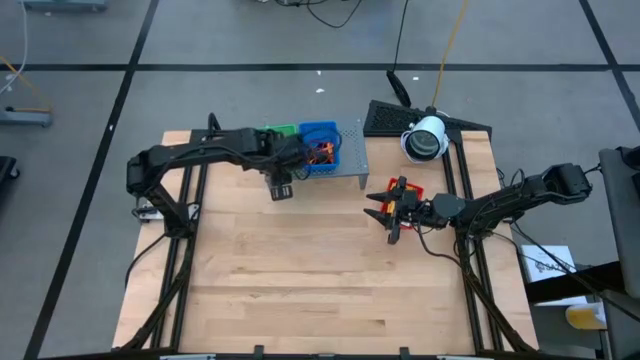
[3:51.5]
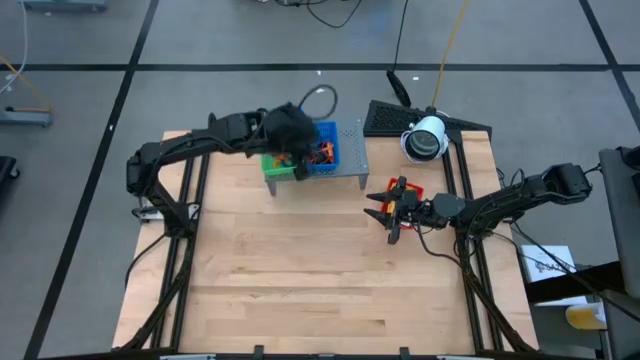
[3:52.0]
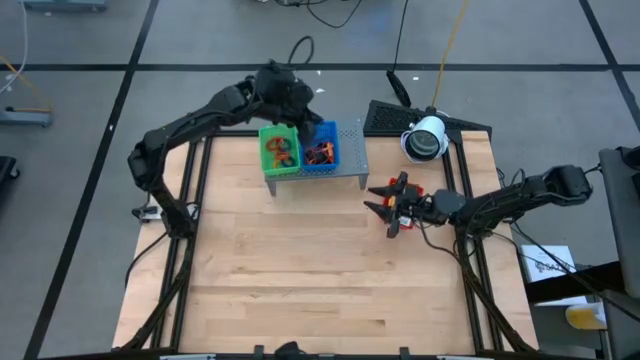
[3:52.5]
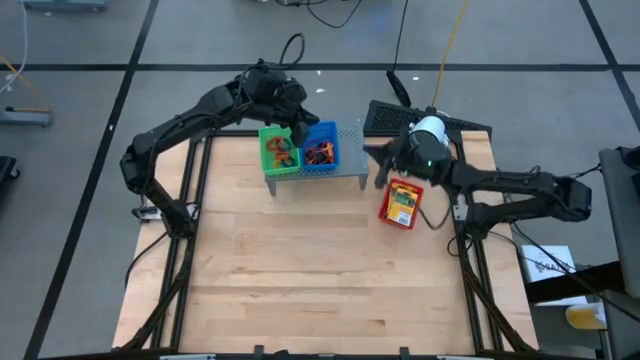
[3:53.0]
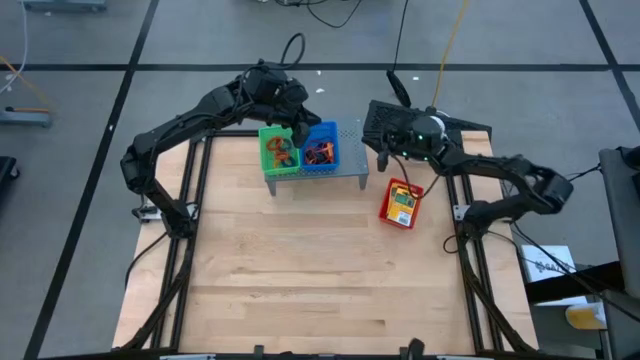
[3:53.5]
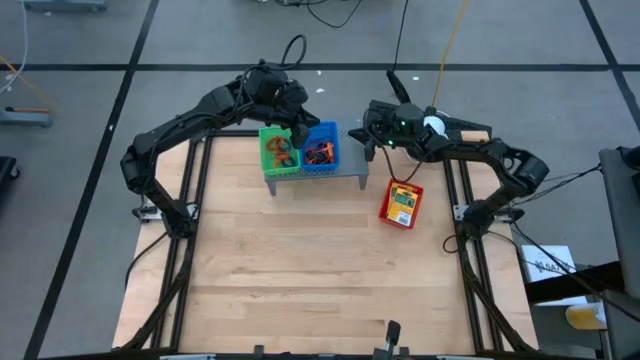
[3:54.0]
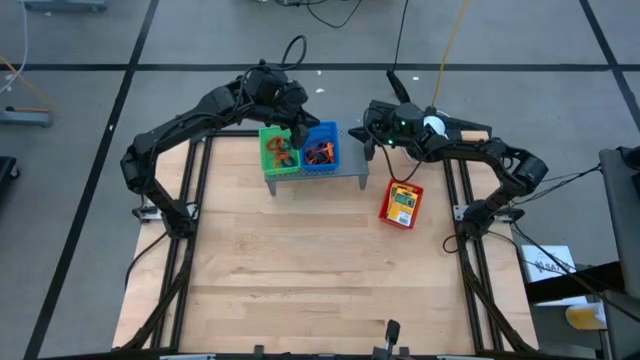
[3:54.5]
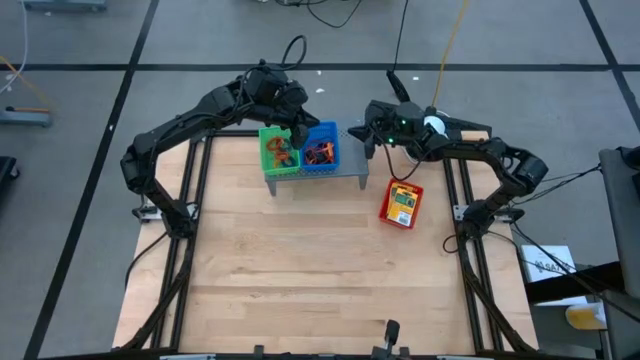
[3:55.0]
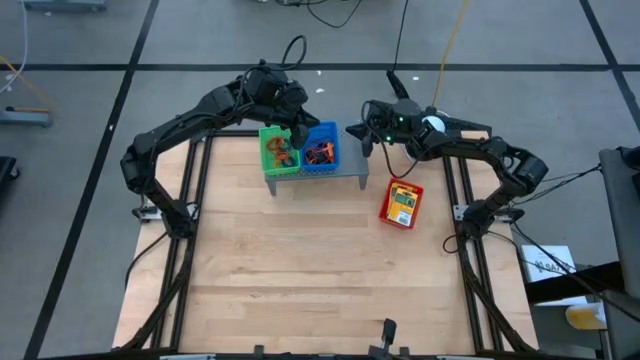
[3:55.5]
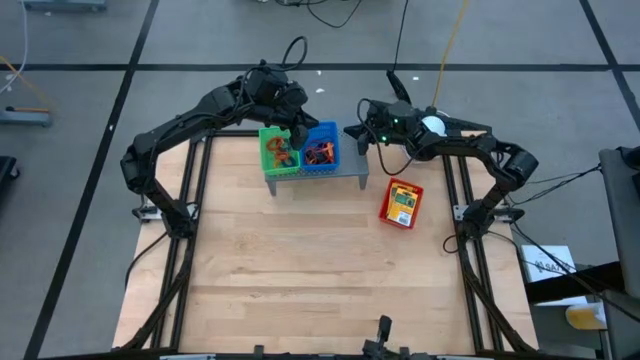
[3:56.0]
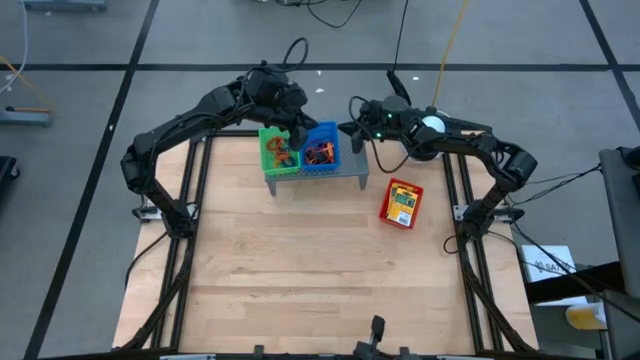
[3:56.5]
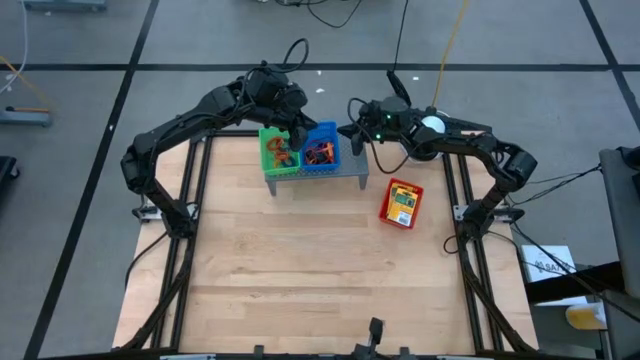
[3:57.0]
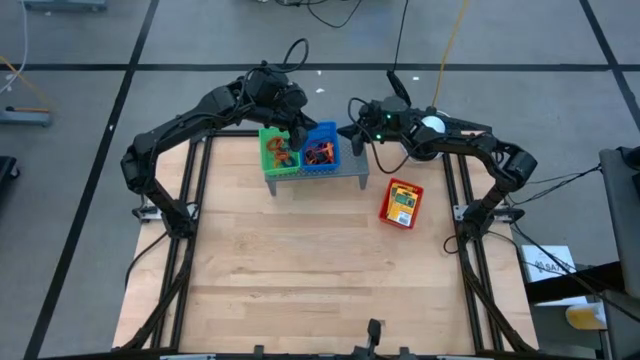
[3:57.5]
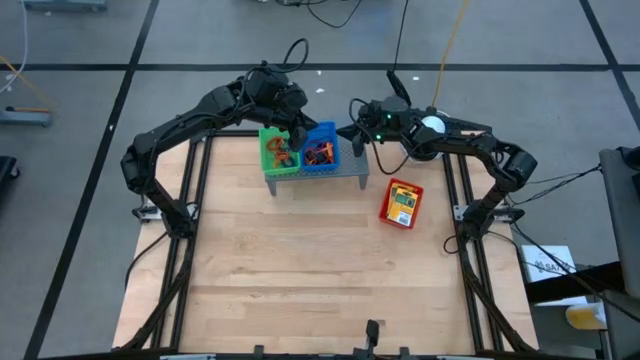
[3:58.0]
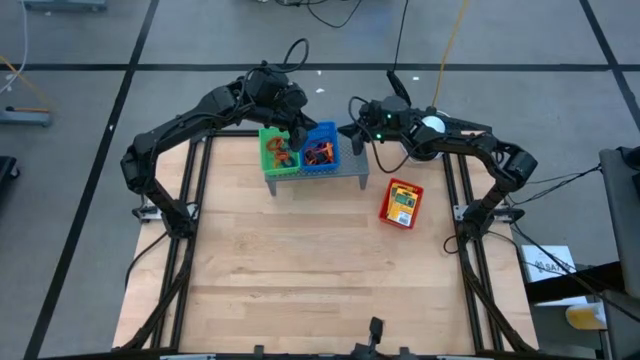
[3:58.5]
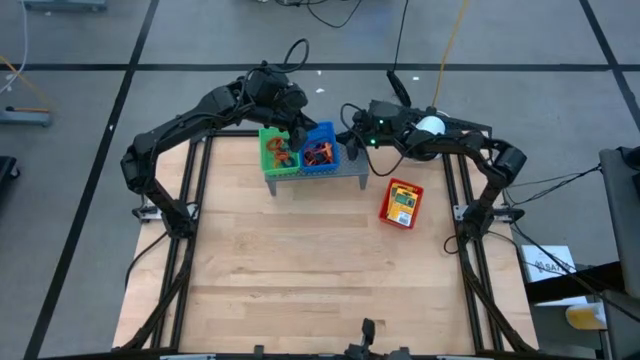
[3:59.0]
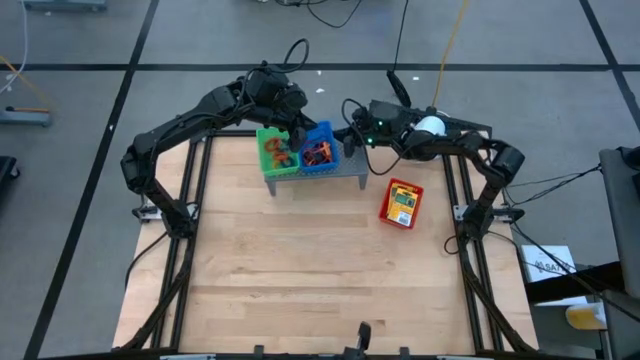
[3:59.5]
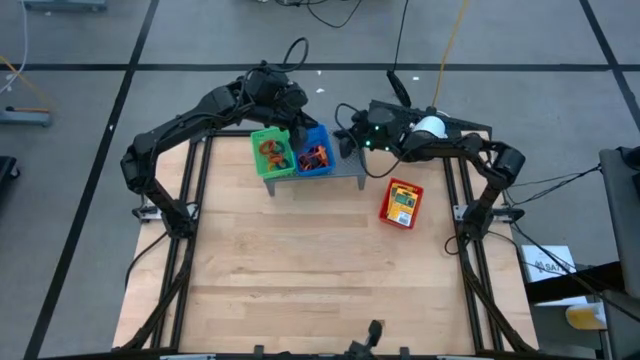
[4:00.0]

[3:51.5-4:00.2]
Task: Pick & Place Office Desk Supplies
Adjust the blue bin on the shelf

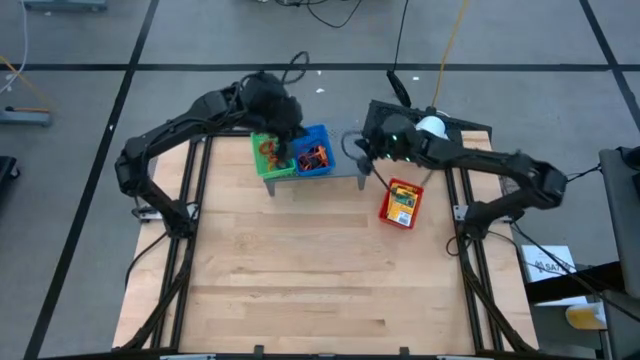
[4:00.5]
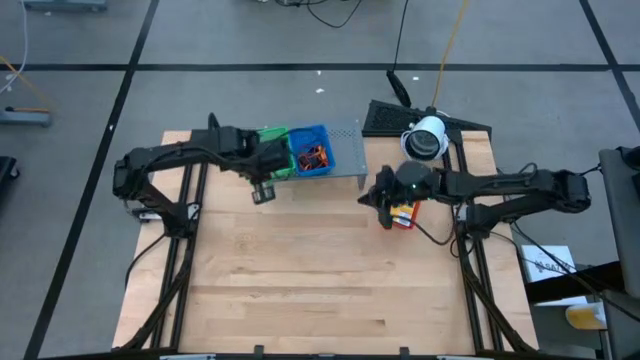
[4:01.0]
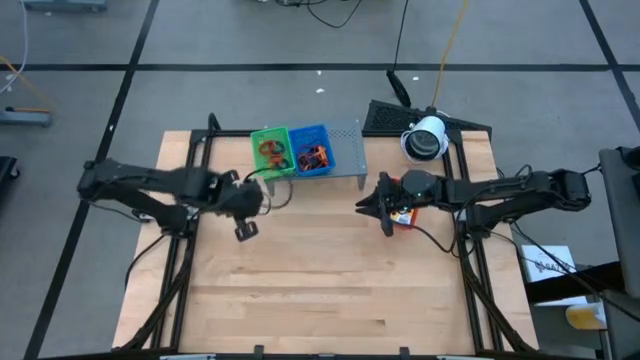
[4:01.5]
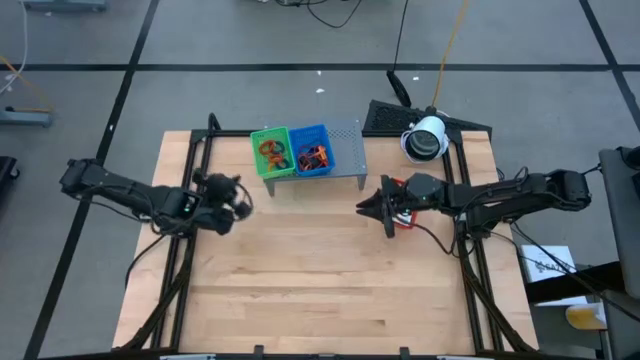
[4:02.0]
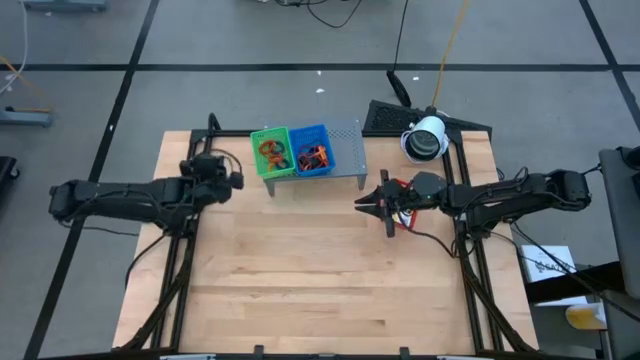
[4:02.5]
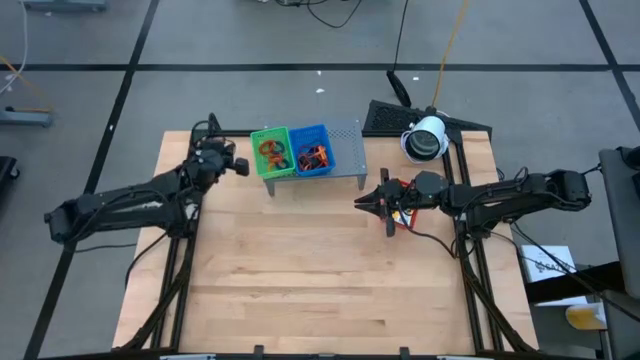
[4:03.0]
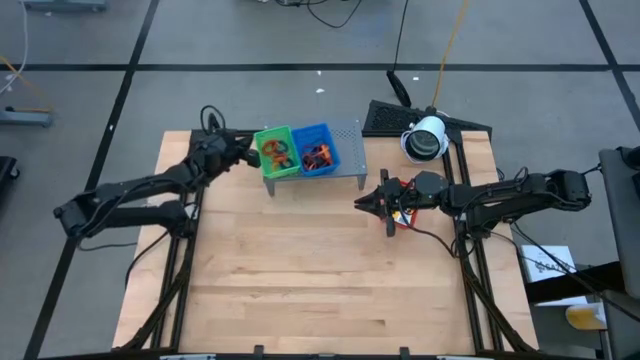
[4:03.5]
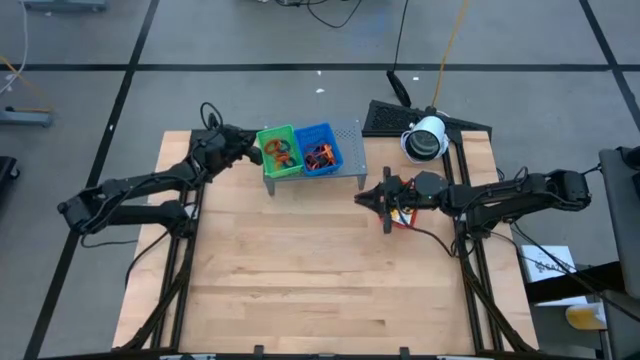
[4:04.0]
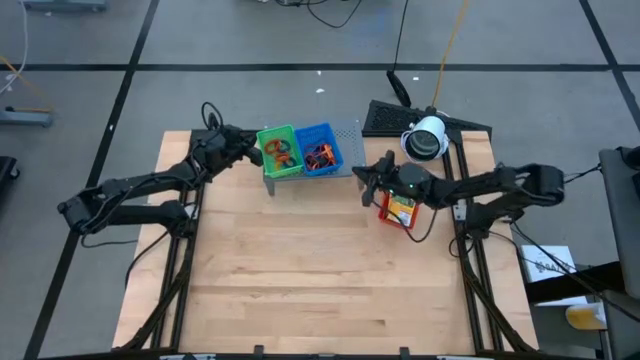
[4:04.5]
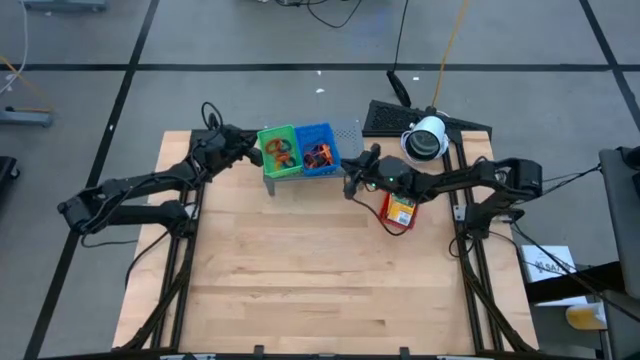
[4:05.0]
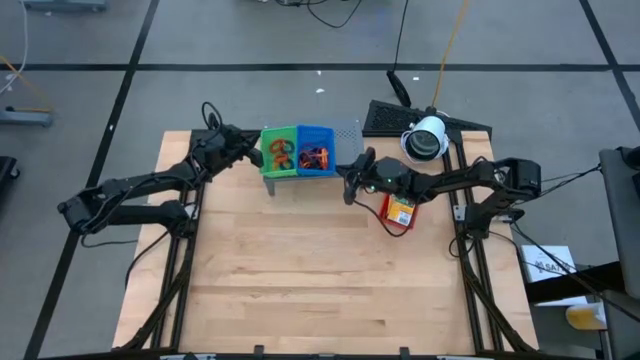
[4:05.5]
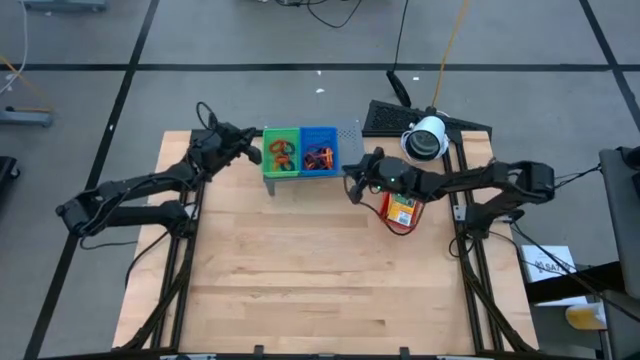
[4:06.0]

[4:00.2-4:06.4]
Adjust the bins on the shelf

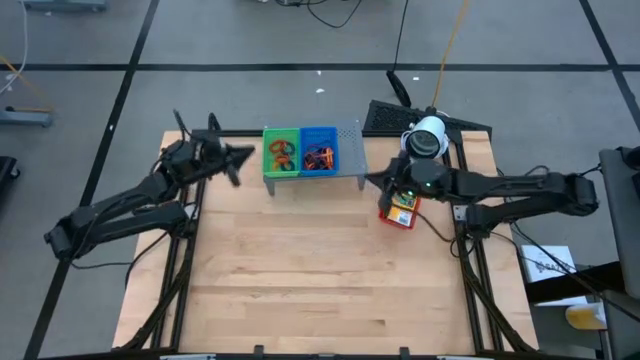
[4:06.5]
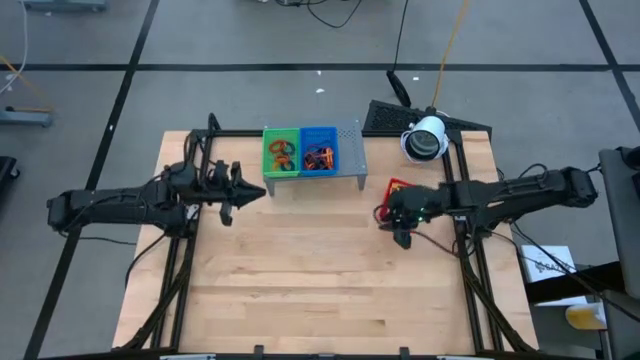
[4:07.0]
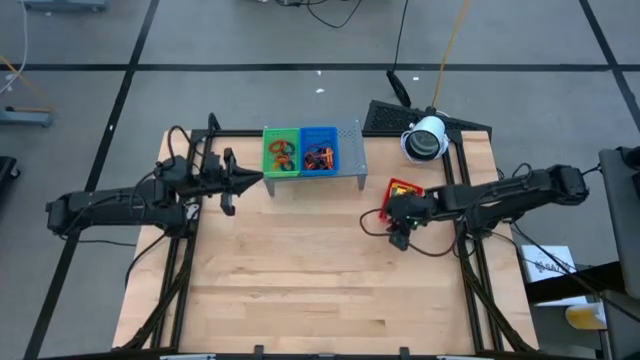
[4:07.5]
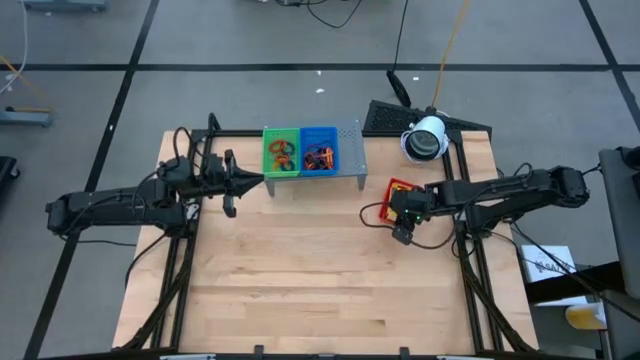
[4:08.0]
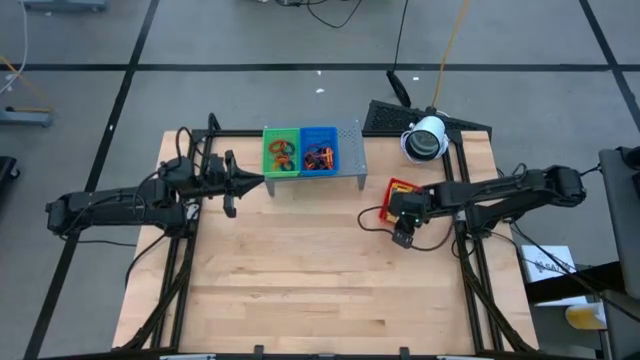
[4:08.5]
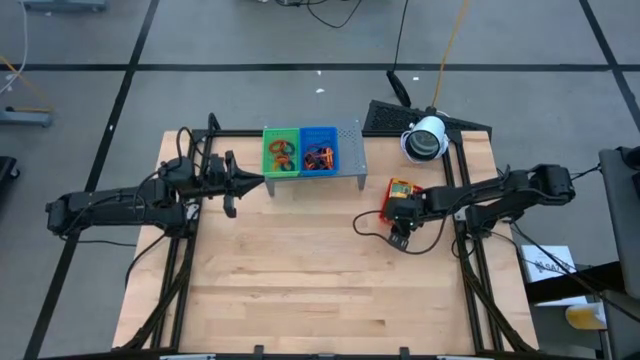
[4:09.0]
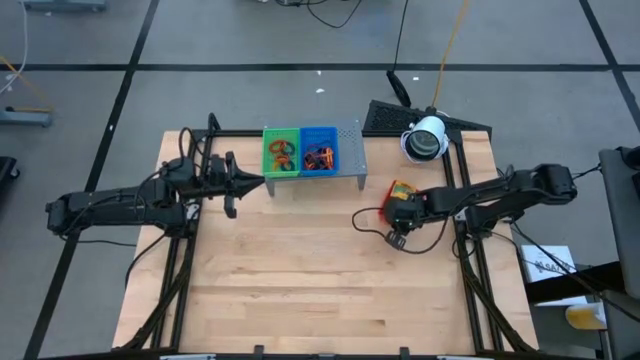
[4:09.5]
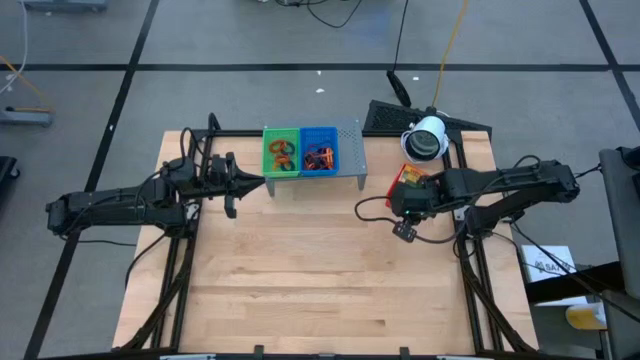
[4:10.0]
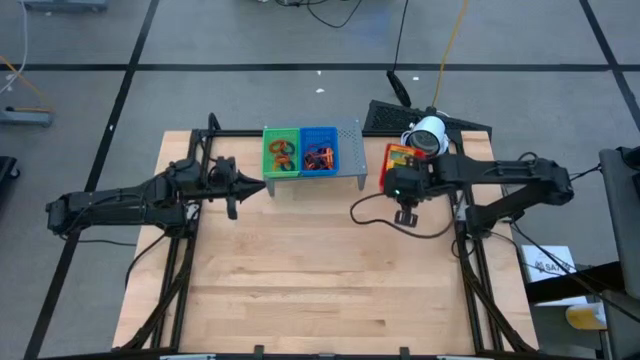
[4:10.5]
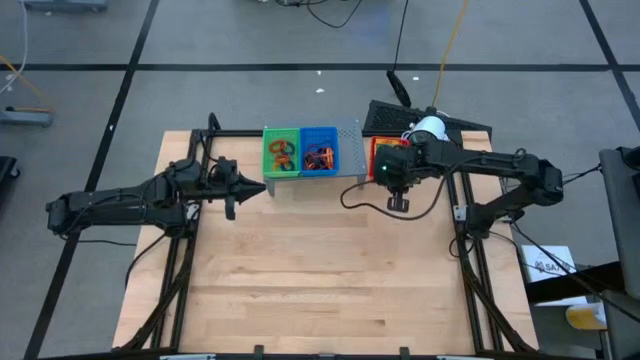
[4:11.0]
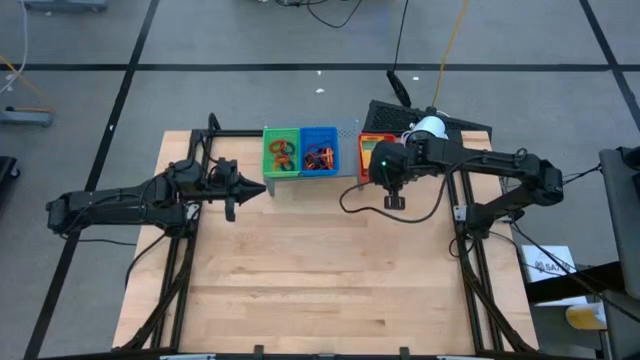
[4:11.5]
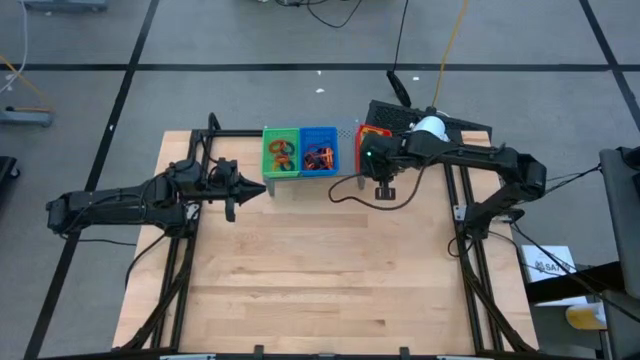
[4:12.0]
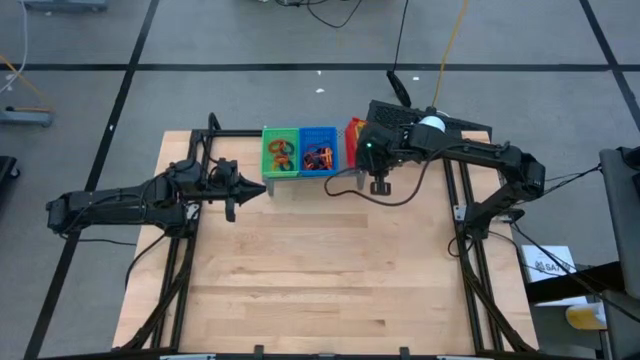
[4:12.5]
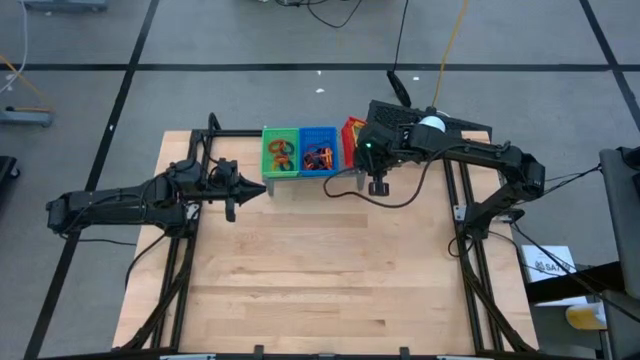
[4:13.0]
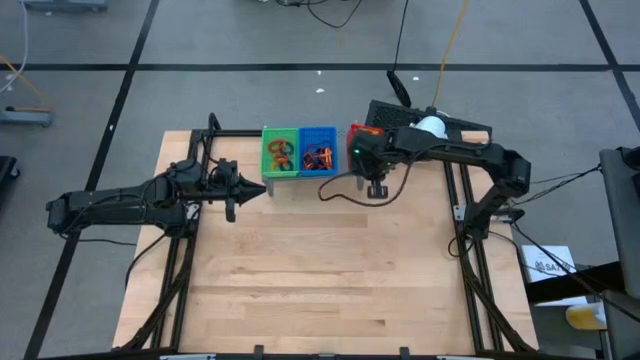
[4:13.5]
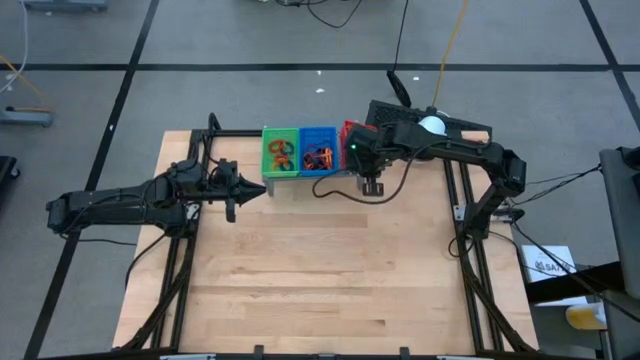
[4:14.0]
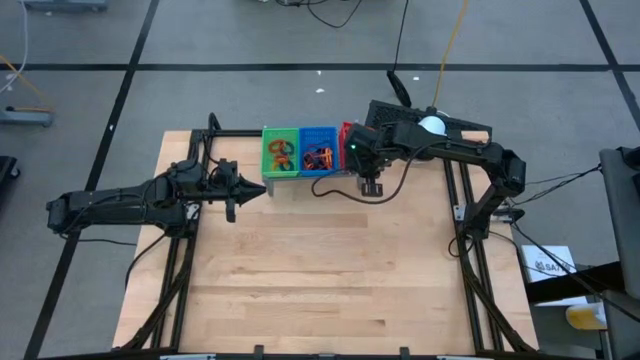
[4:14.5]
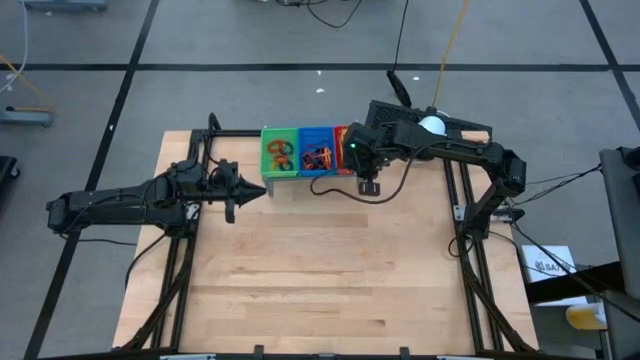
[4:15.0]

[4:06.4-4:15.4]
Put the red bin on the shelf
